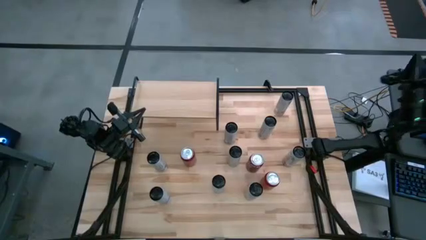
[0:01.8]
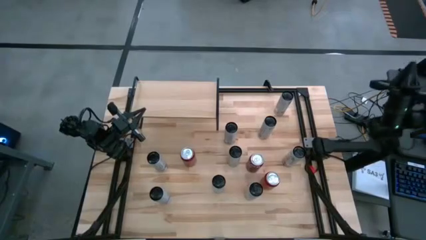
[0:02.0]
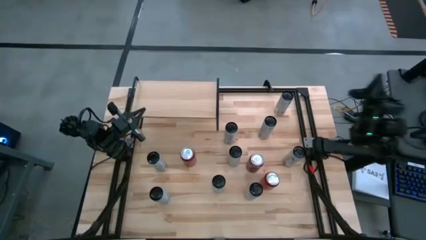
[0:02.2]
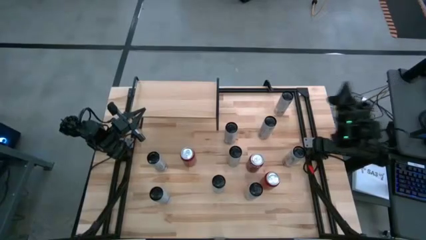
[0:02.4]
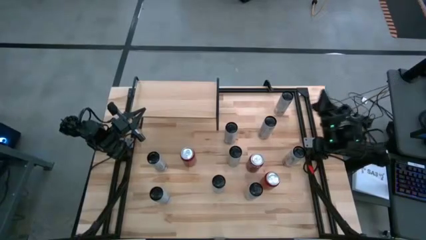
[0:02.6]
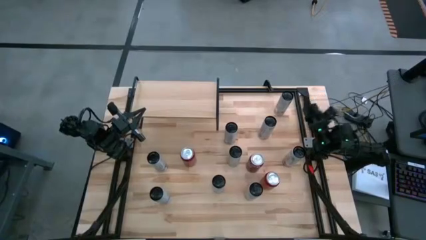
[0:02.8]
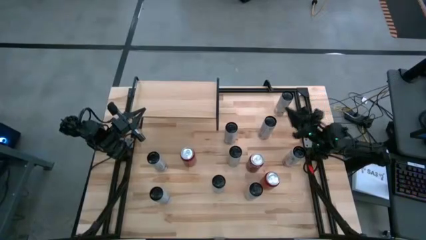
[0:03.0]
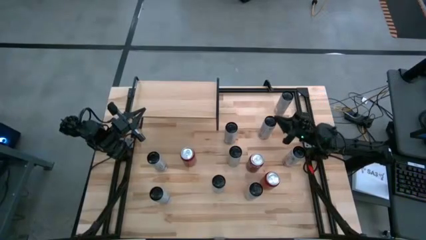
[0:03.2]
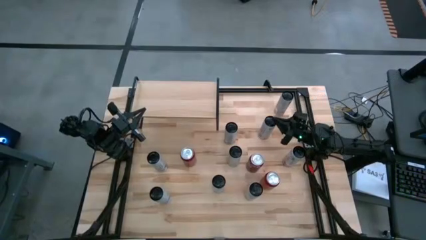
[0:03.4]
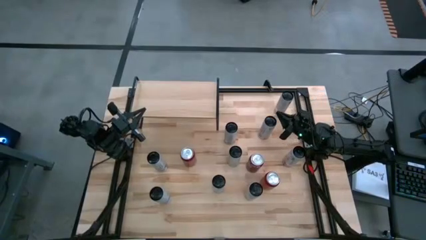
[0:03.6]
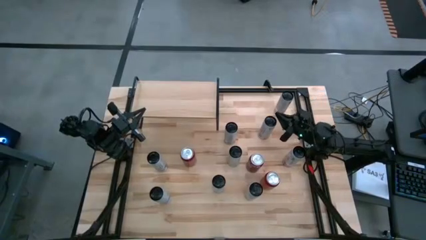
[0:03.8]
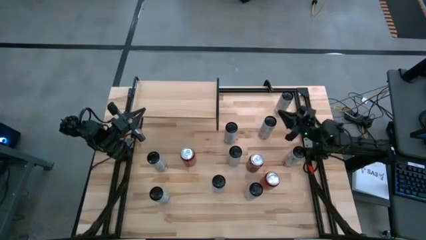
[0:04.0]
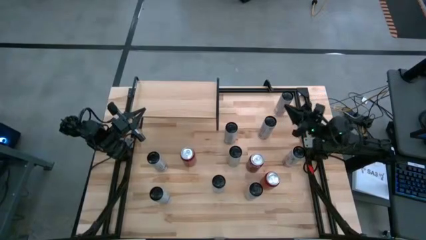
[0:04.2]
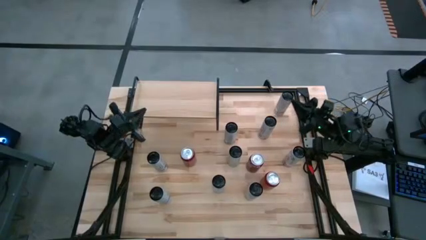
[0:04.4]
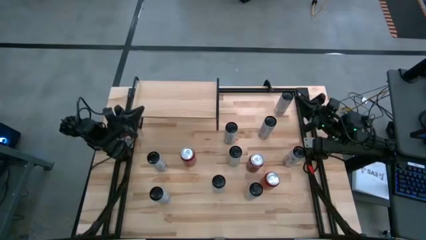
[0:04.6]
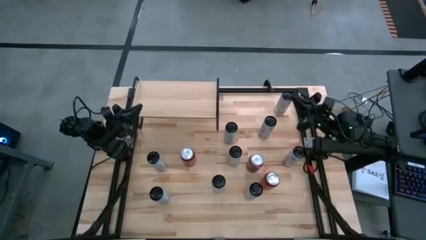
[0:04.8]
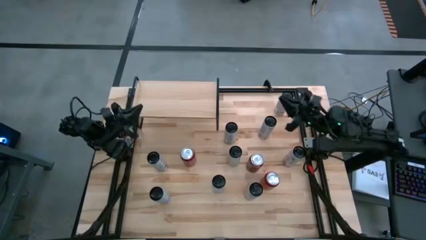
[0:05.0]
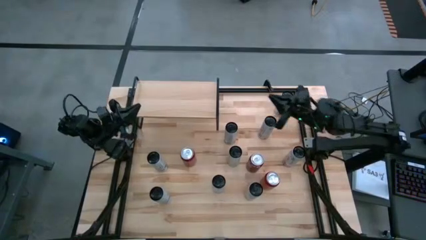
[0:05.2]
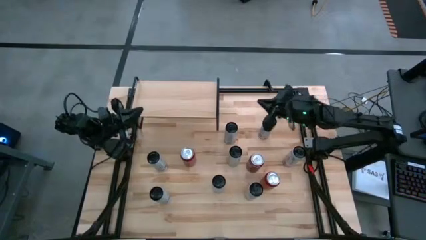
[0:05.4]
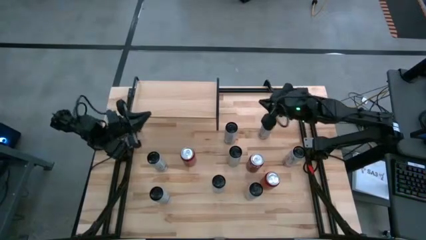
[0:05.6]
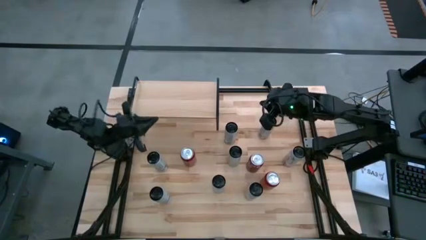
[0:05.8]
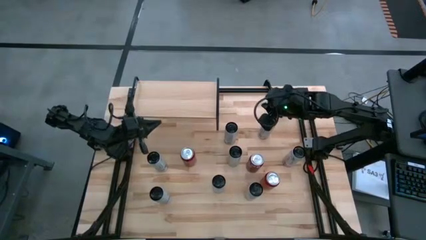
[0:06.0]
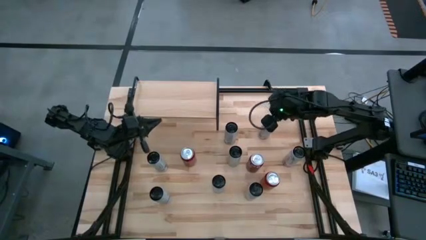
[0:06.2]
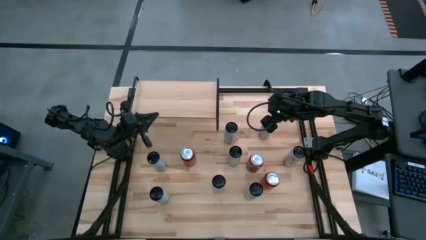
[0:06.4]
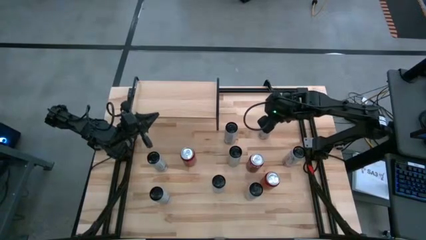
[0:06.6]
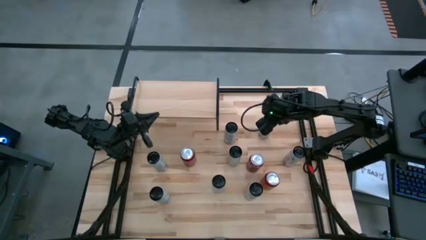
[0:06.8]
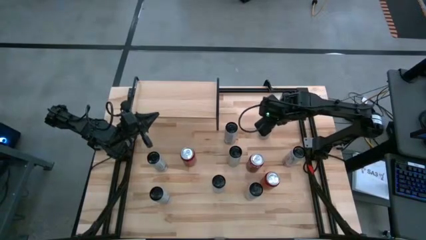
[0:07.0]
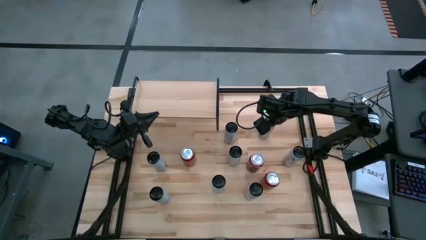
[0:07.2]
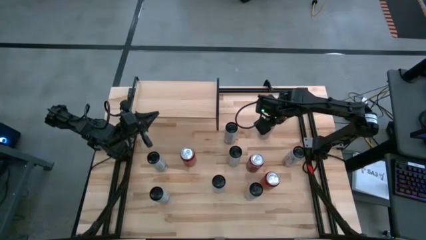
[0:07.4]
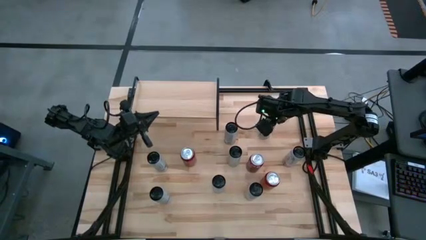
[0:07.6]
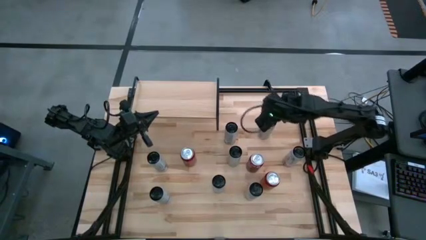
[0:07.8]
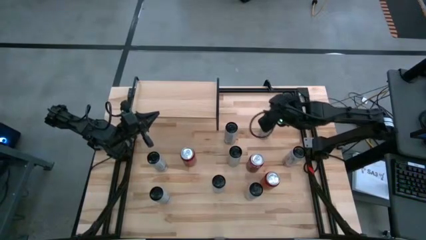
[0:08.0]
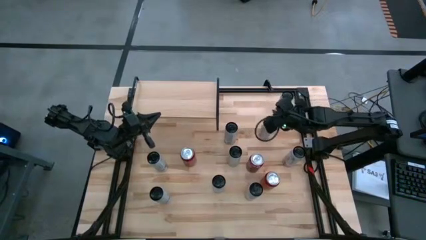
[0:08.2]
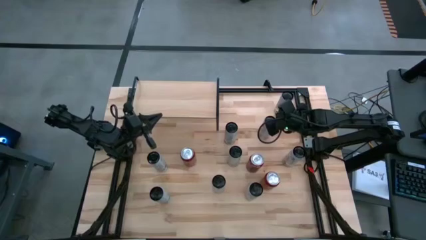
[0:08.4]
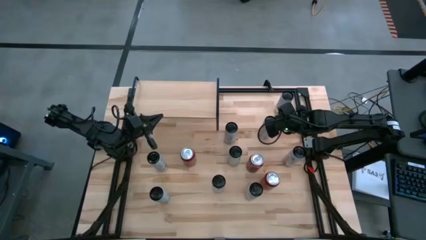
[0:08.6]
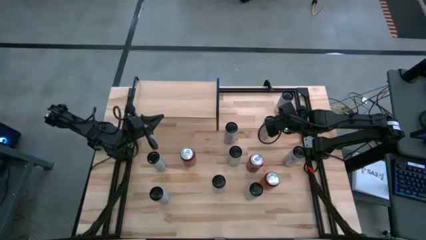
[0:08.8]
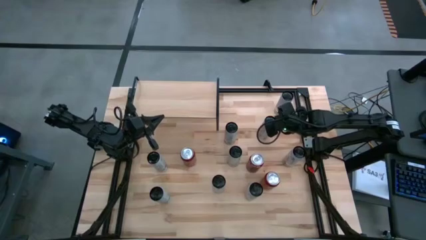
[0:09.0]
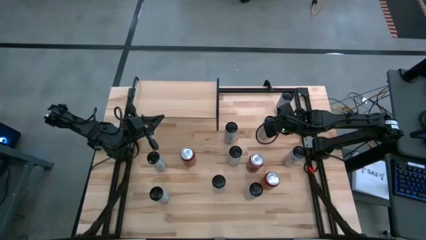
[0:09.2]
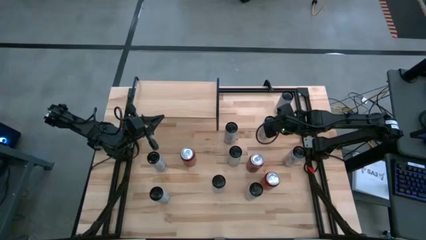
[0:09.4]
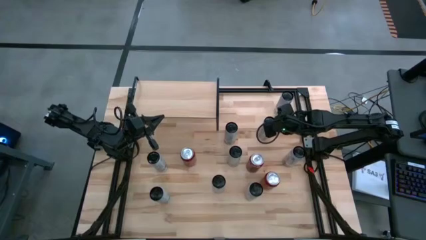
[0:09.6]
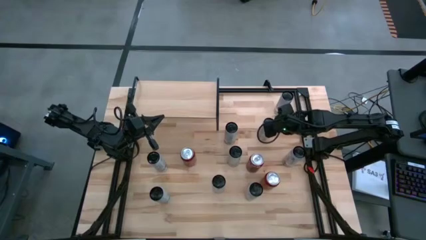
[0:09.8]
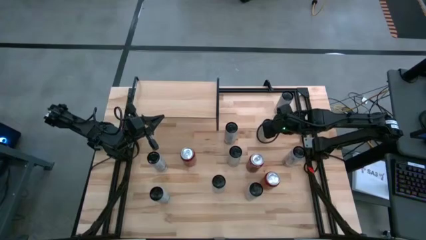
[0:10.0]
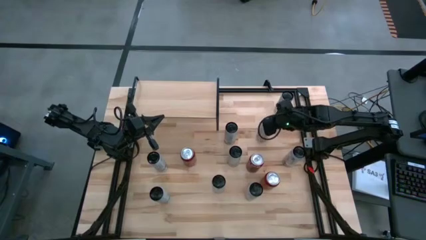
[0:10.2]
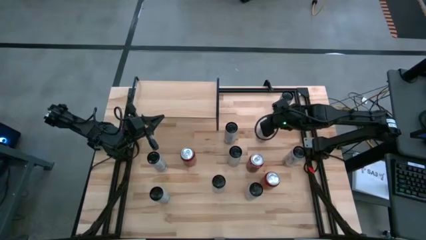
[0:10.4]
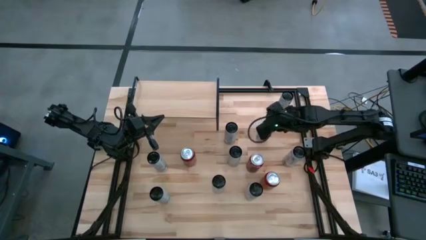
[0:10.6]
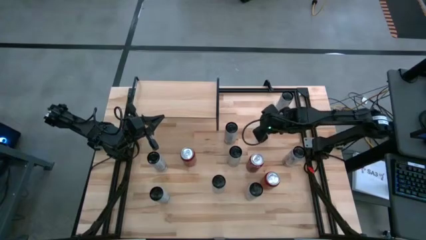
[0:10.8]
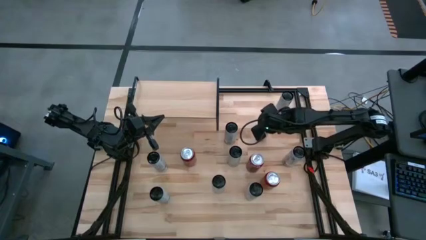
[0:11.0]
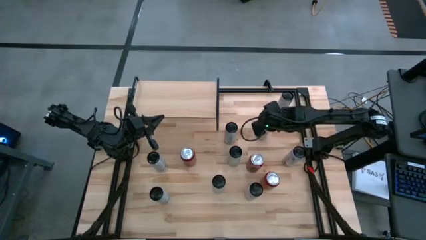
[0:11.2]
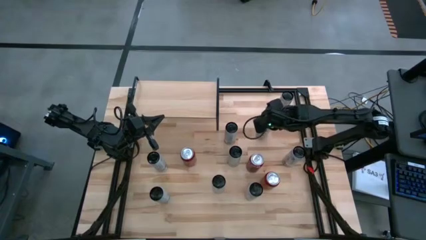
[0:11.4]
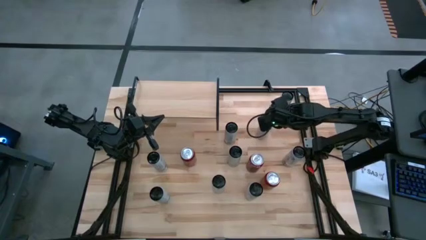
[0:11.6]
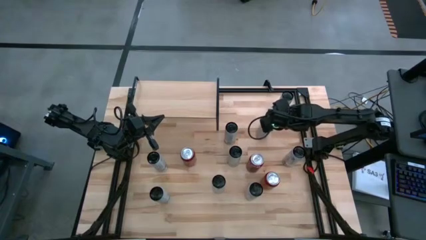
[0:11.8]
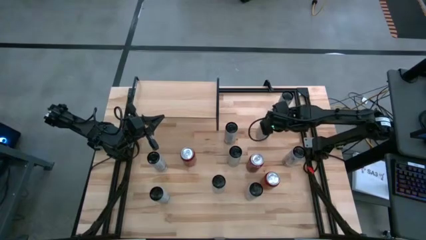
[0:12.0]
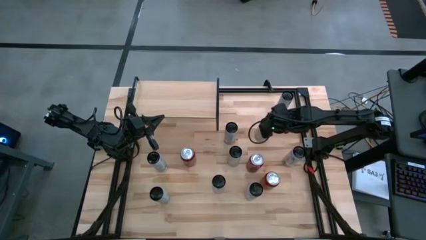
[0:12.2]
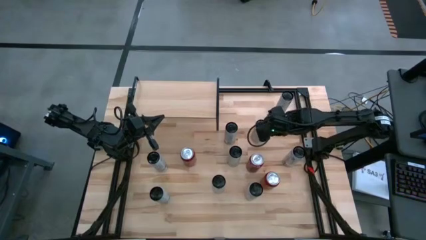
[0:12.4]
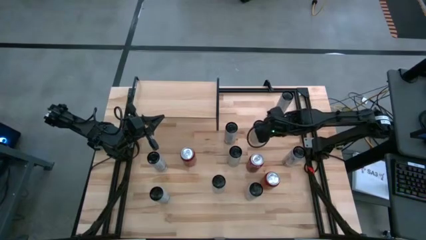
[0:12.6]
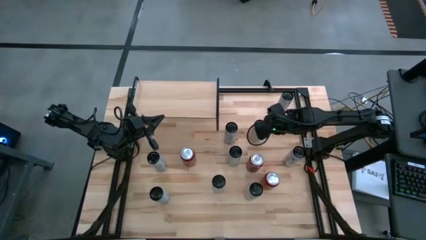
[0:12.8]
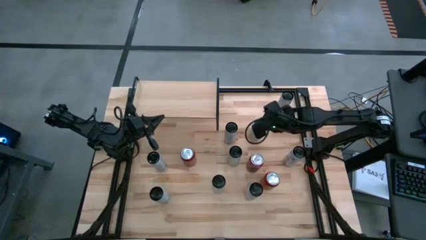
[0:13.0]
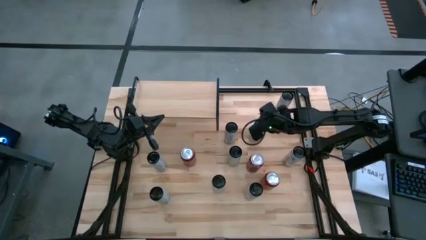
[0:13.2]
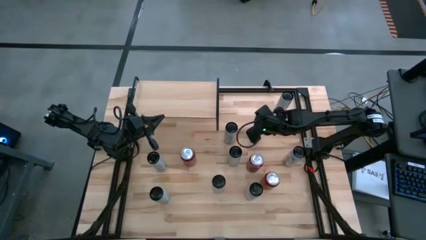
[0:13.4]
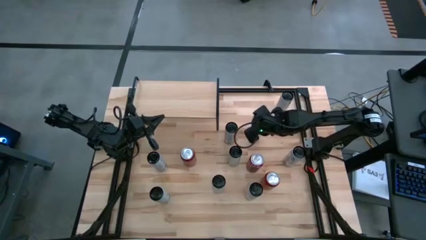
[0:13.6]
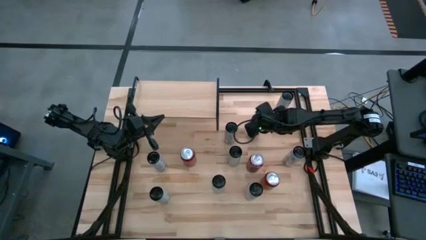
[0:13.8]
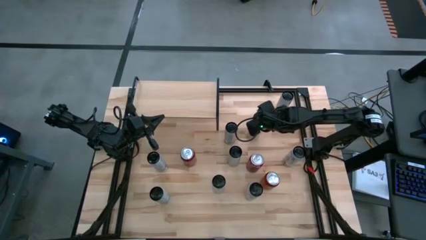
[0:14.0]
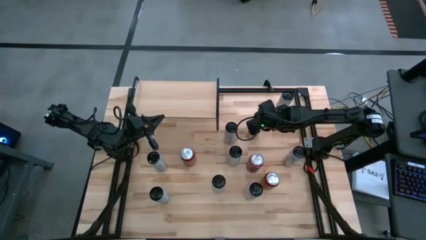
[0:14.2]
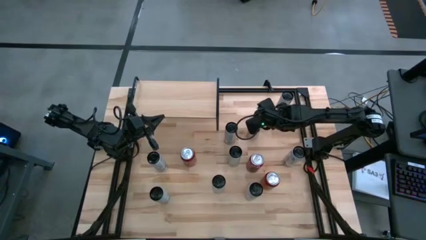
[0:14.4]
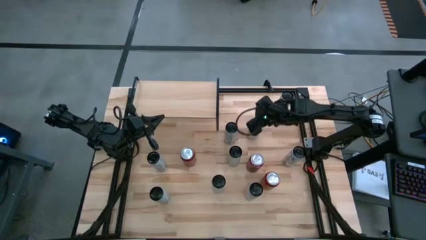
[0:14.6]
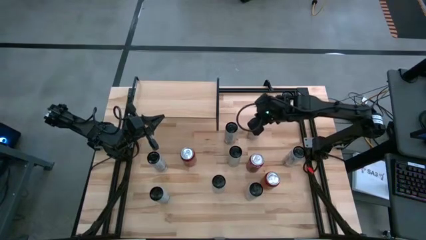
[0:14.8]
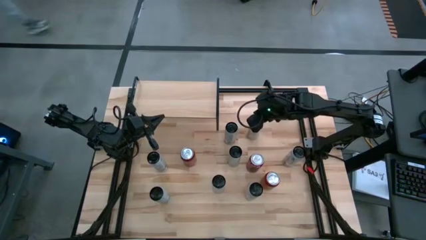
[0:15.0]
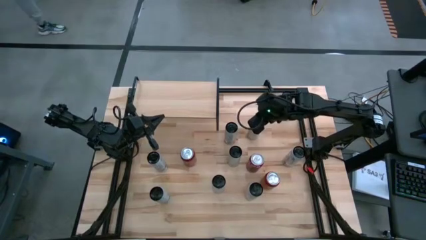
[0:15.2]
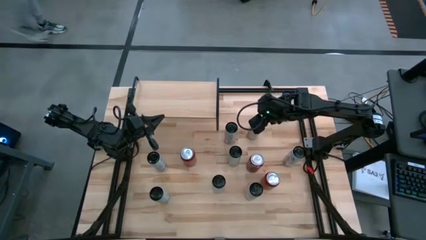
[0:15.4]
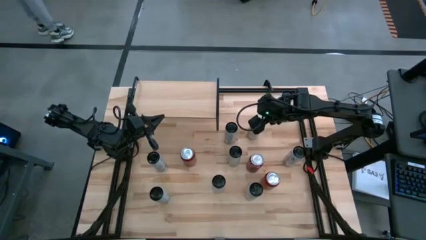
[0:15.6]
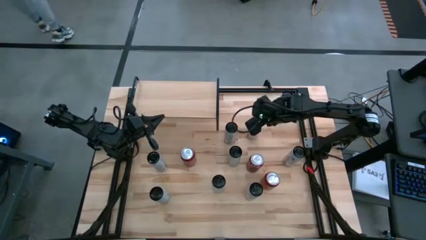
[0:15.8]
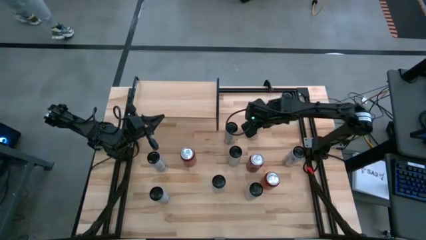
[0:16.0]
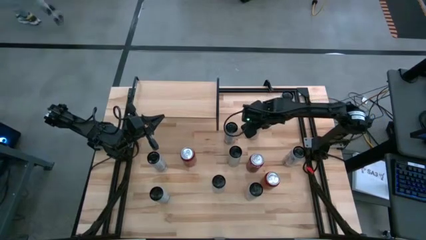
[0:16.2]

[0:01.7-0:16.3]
Task: Place canned beverage on shelf
Put the top right white yellow soda can on the shelf
